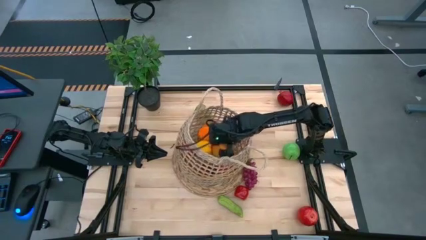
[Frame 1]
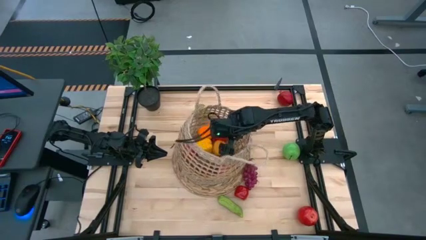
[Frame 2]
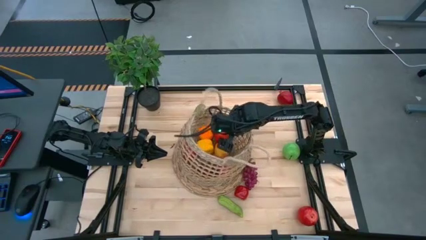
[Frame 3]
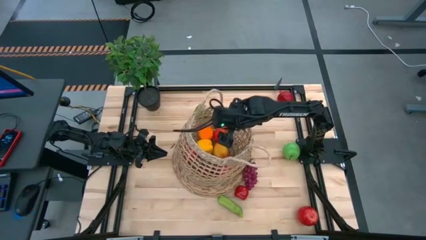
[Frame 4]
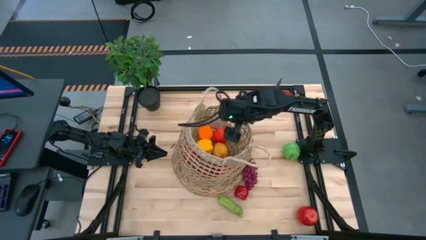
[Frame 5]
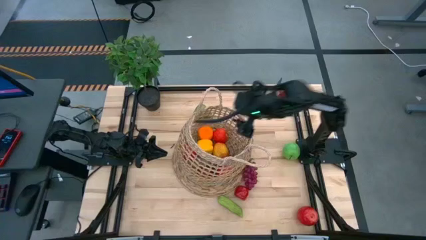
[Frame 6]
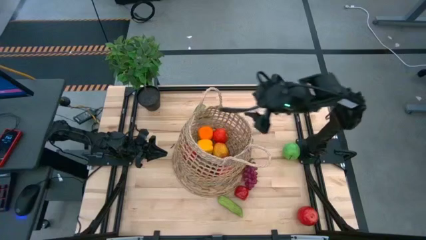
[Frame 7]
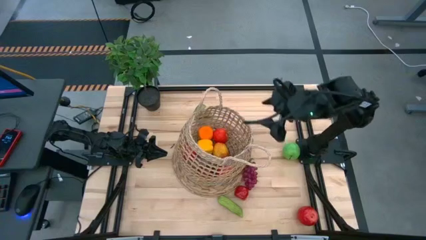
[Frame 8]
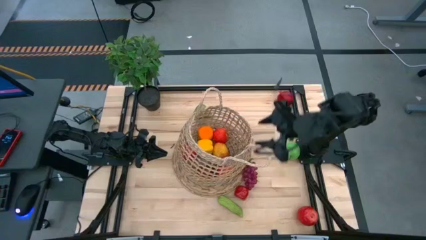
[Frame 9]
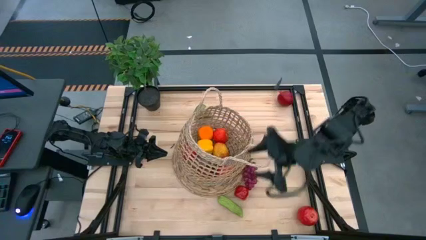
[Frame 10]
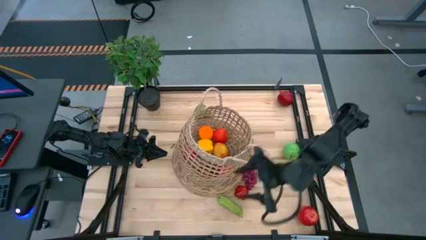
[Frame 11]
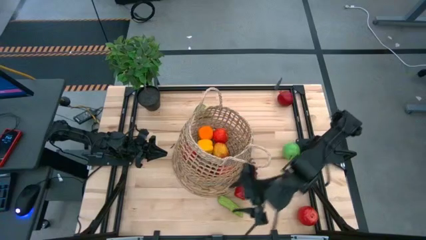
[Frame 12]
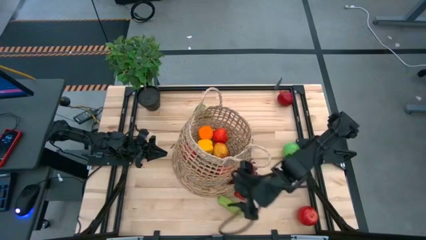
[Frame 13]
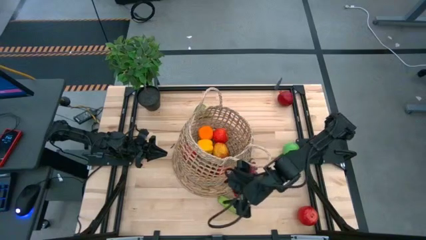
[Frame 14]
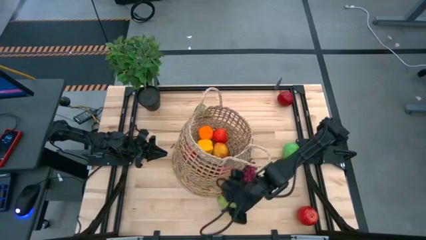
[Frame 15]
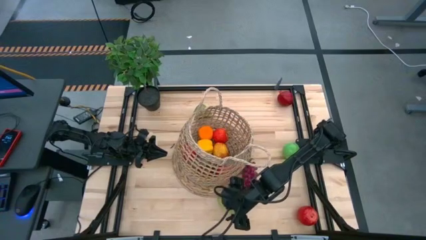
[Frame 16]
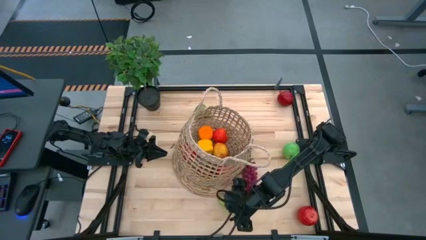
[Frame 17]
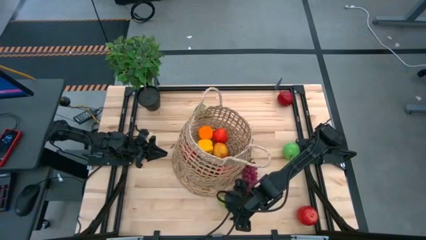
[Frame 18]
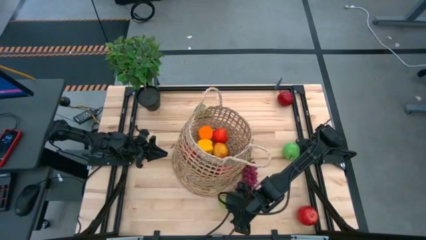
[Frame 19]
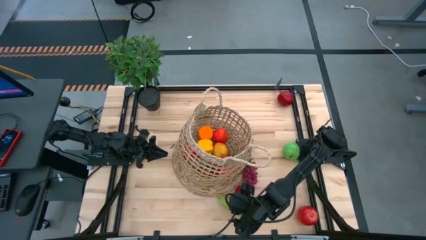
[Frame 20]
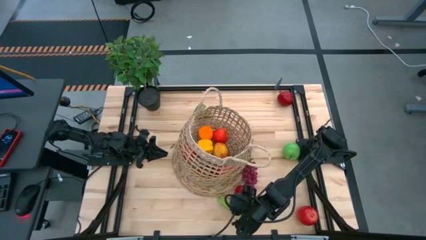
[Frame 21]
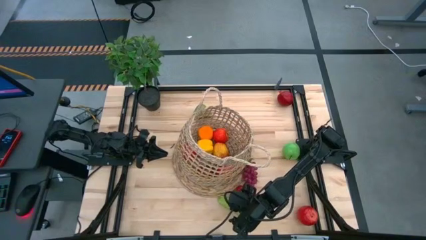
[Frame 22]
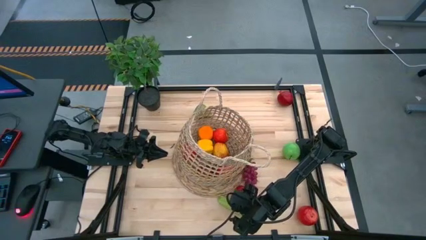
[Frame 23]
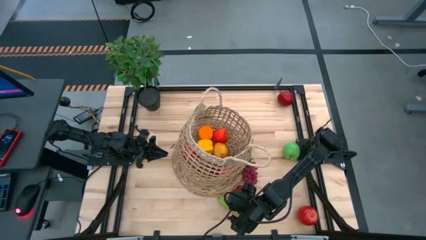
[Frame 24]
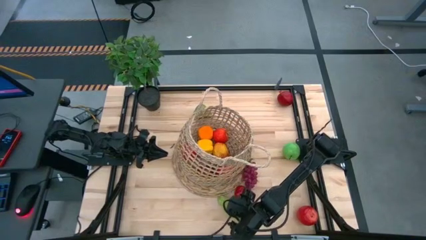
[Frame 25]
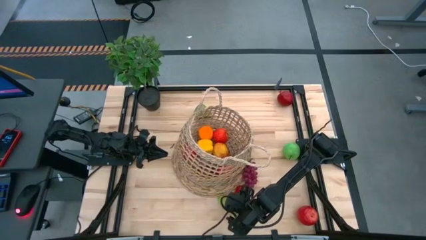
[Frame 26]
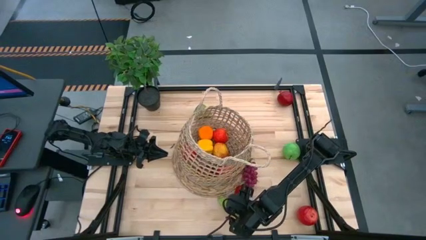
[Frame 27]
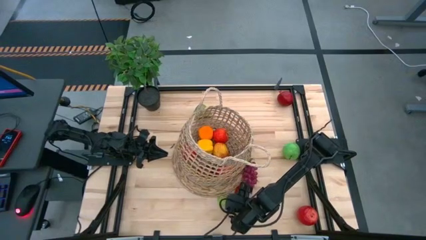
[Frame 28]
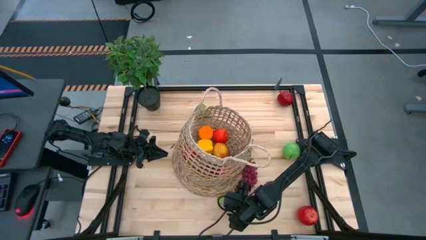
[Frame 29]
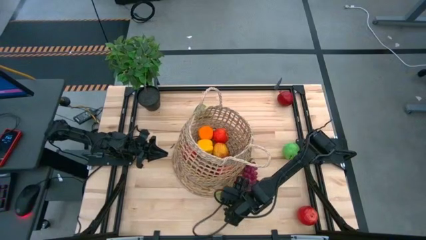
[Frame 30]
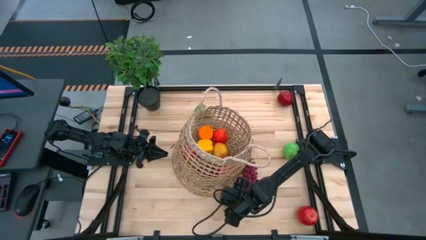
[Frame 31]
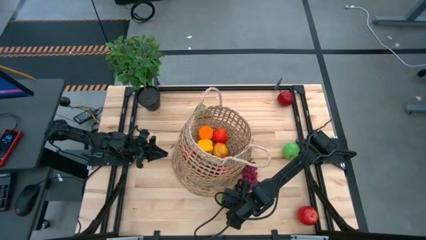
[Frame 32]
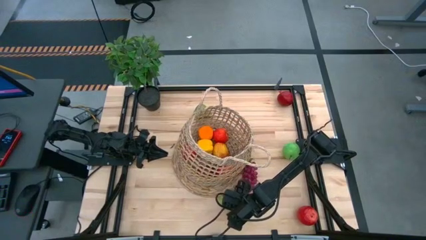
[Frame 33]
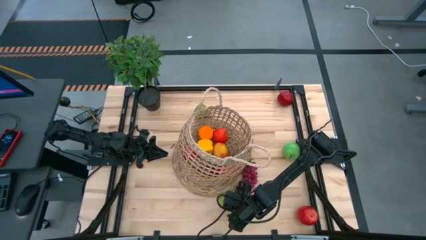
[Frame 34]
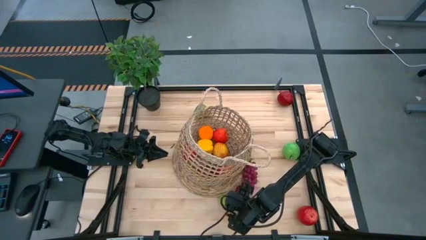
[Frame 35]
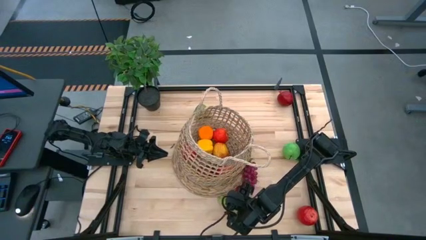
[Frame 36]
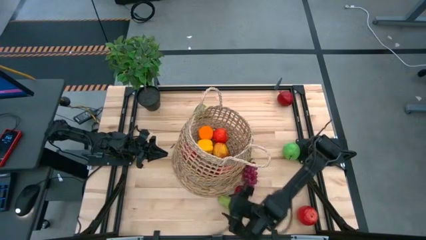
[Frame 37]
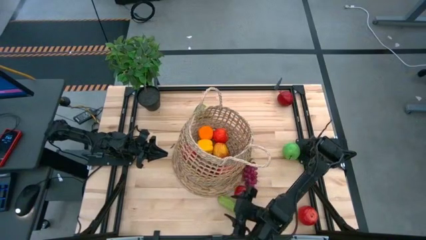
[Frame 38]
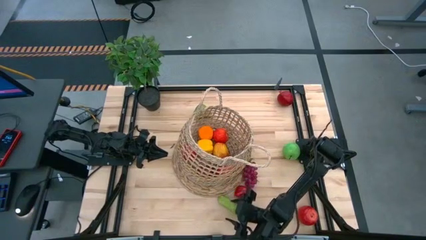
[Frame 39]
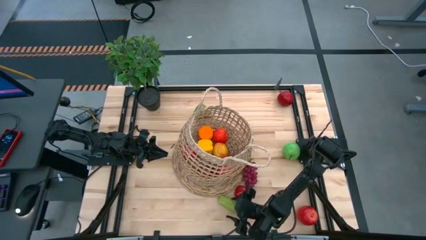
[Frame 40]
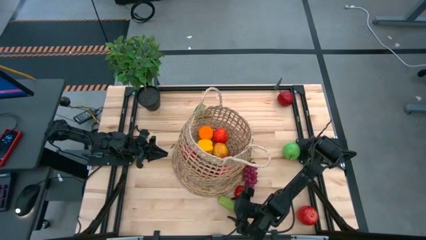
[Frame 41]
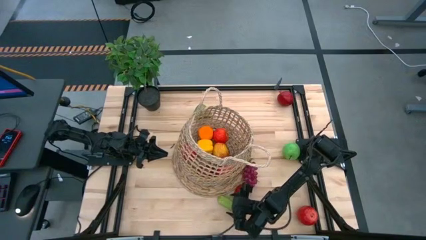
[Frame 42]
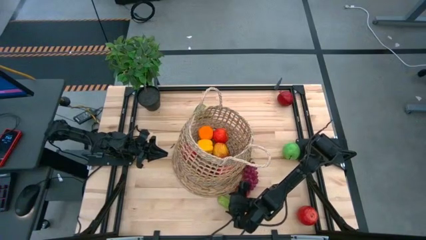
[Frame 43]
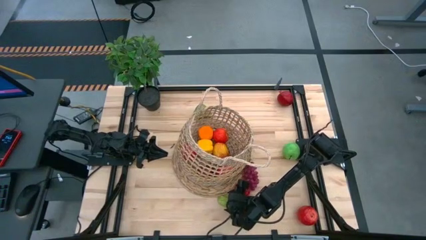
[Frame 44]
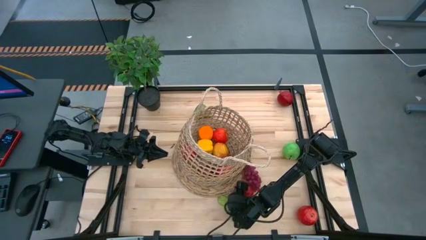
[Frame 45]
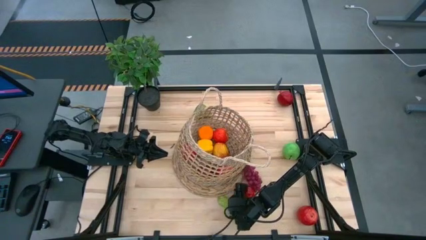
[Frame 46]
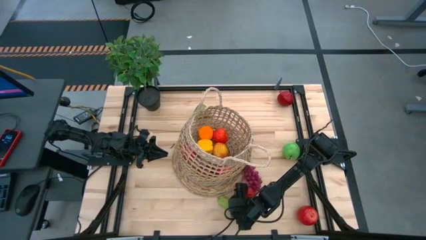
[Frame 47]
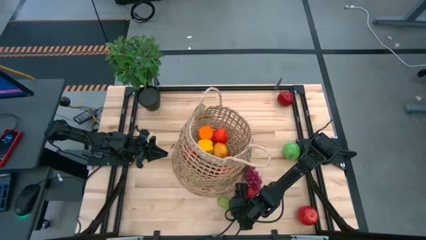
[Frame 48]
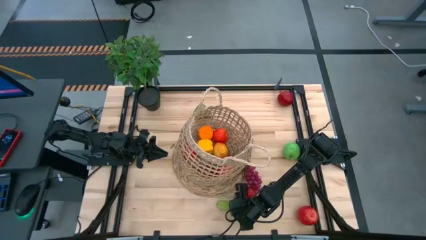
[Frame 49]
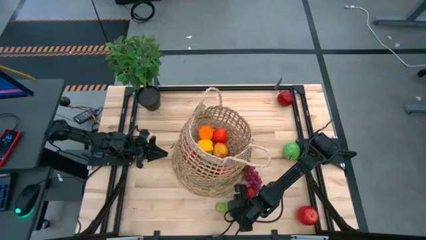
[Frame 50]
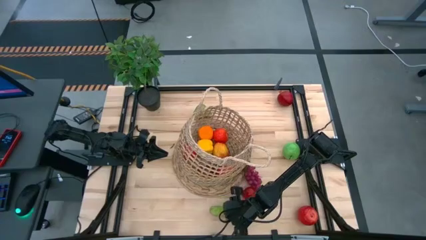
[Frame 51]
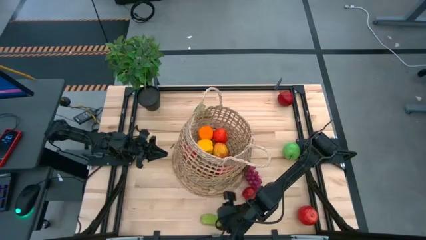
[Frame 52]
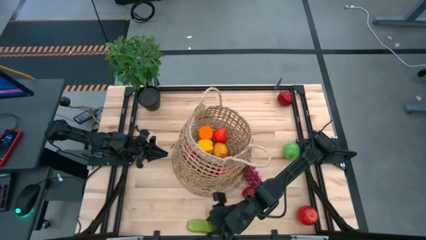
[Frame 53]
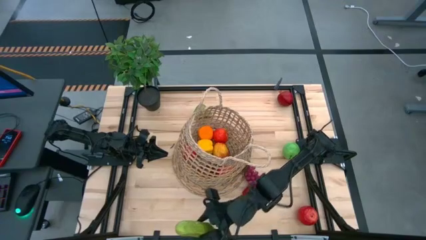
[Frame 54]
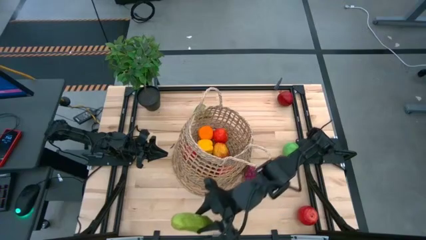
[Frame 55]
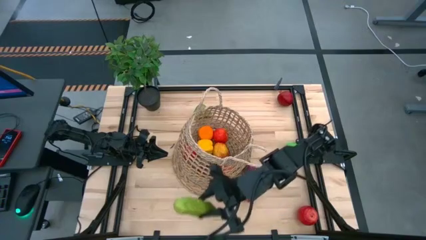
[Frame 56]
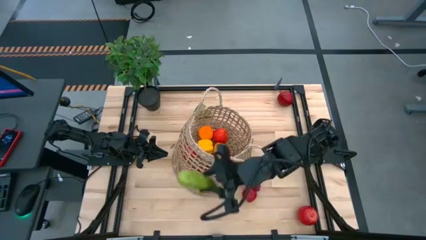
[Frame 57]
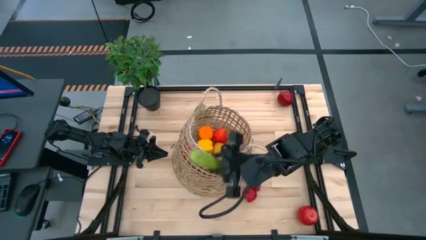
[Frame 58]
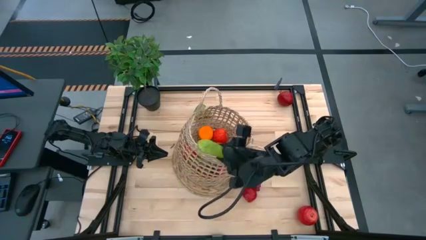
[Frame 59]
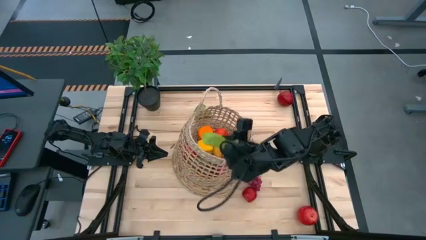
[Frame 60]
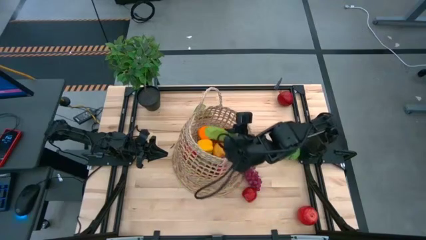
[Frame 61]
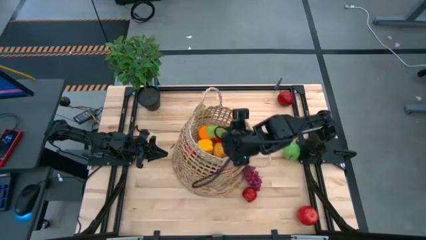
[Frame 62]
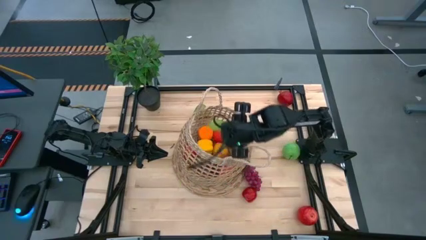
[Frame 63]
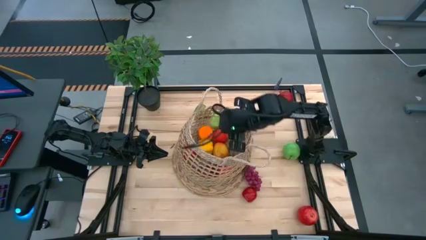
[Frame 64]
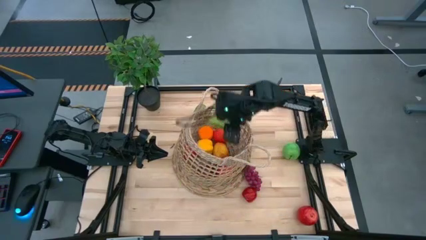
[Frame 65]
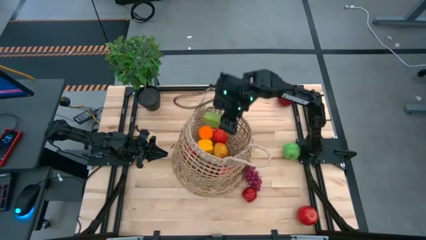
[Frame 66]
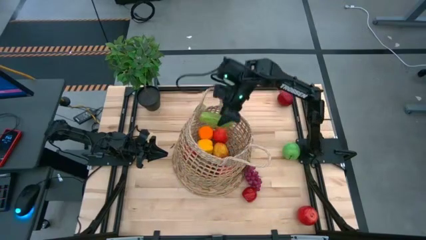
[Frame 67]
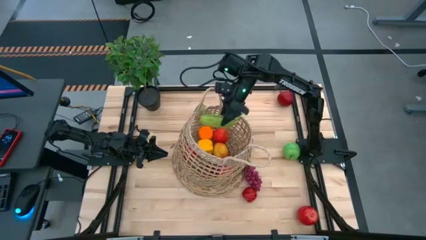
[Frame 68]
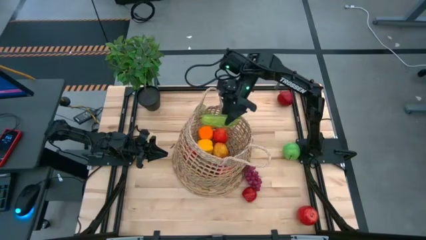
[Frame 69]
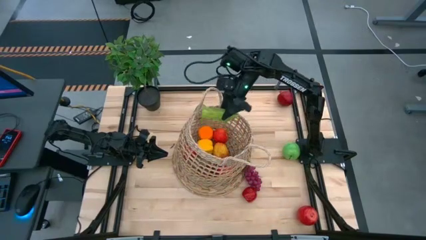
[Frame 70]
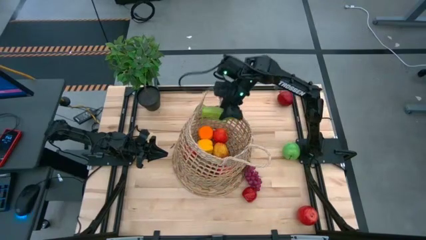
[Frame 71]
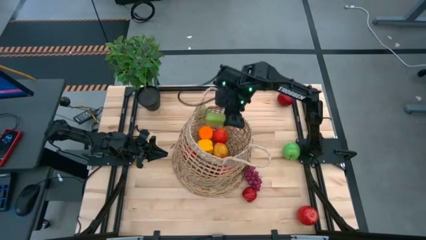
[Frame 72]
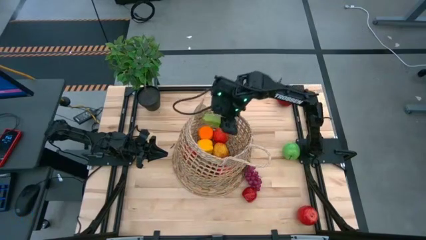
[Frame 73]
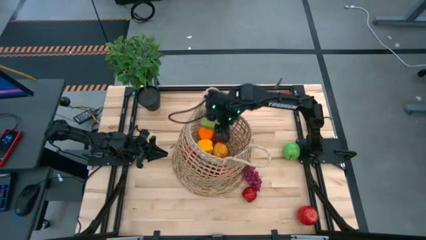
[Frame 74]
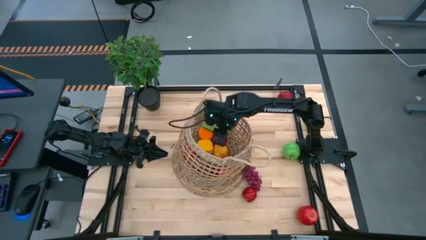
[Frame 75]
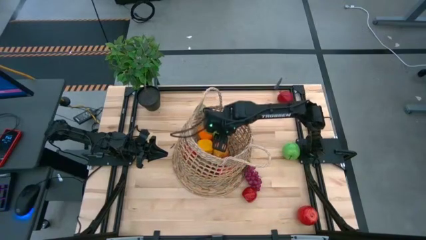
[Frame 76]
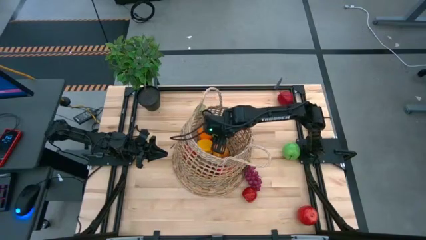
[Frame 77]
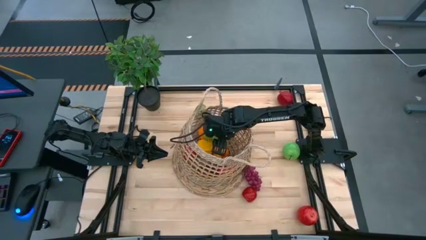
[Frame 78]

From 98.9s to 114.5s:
Task: Build produce basket
Put the green cucumber into the brown basket

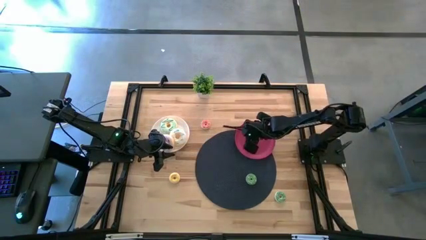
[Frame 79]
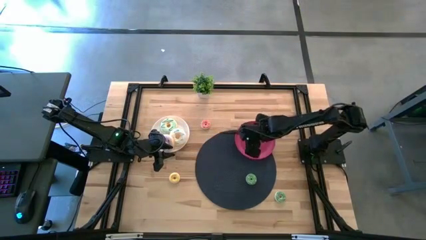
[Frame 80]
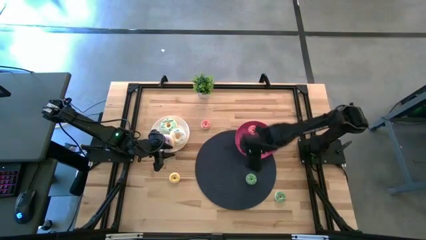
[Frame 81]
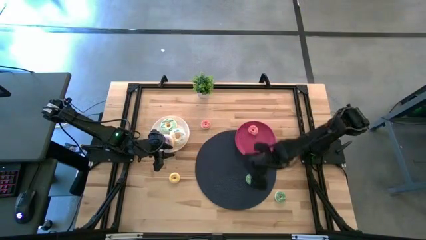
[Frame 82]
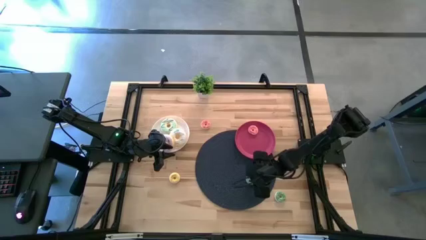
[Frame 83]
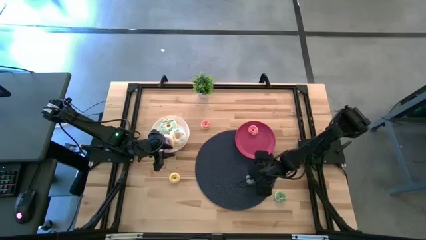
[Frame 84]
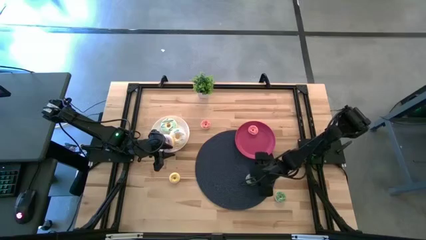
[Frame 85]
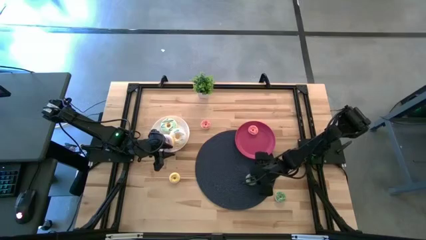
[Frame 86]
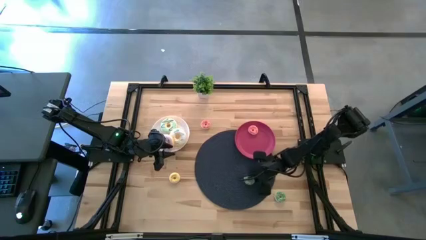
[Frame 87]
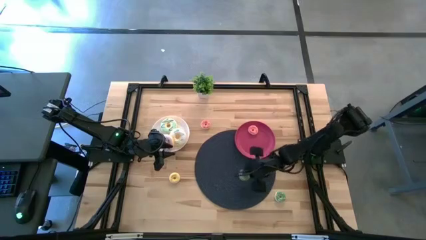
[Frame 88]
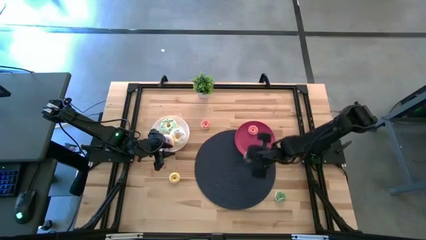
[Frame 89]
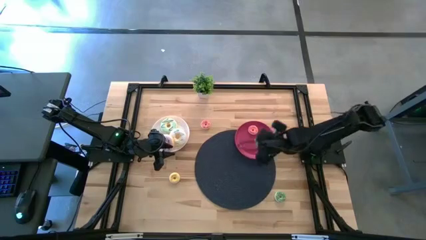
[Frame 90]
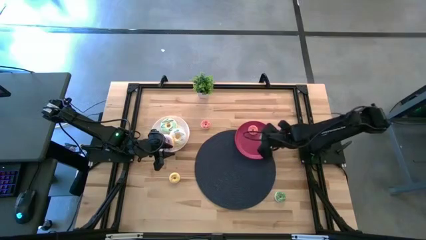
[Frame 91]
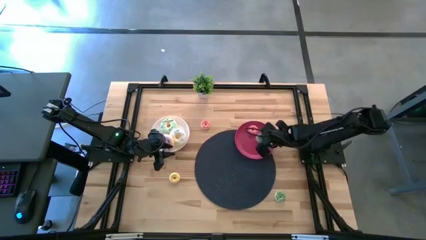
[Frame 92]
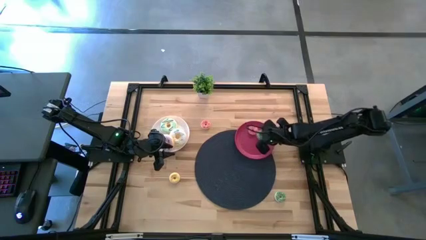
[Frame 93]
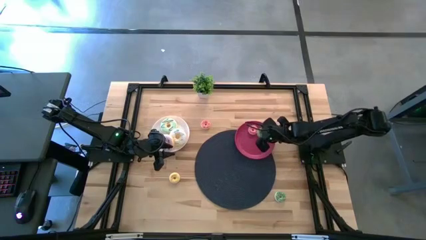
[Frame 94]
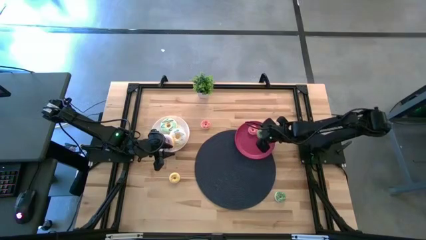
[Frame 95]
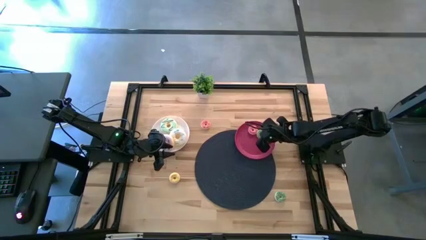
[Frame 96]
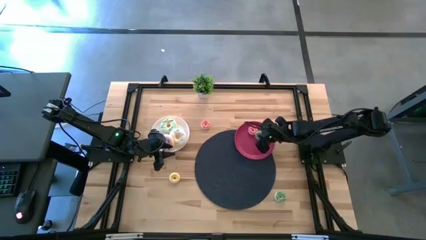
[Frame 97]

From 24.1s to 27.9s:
Task: Pick & Place donuts
Put the top small green donut onto the red plate
